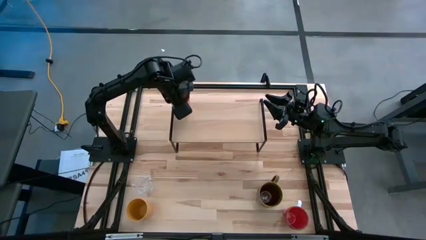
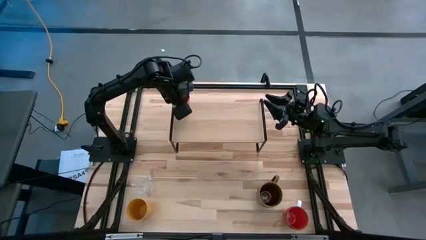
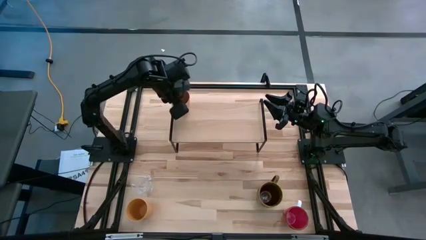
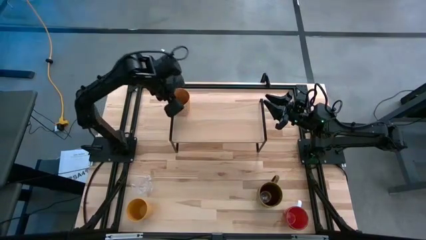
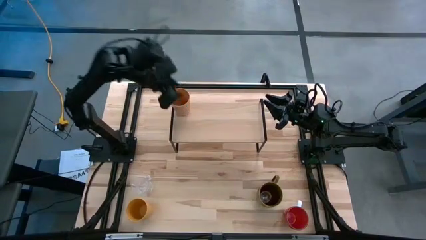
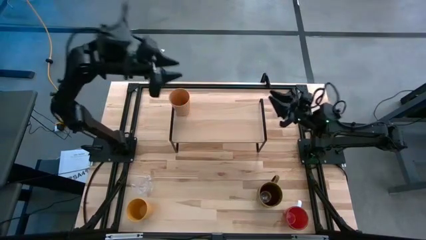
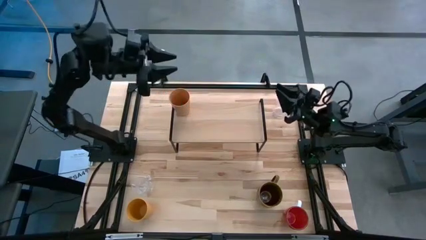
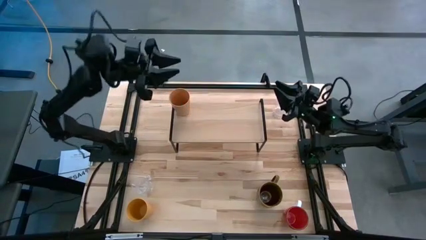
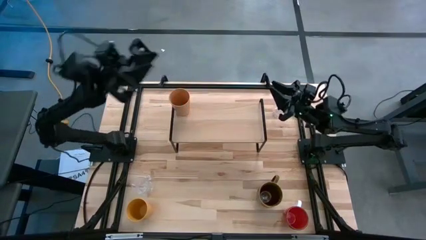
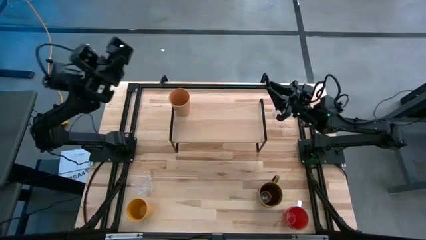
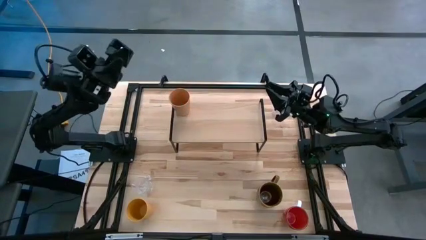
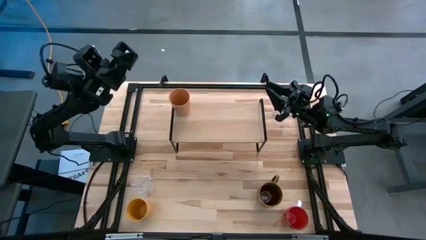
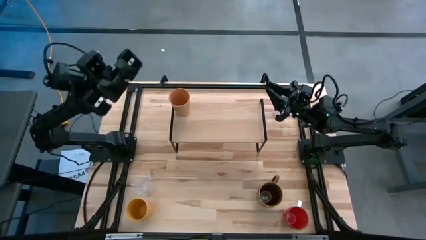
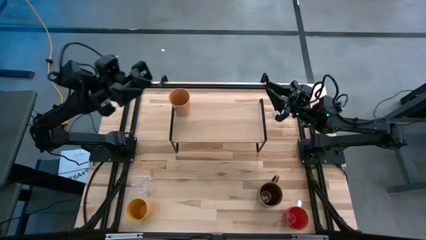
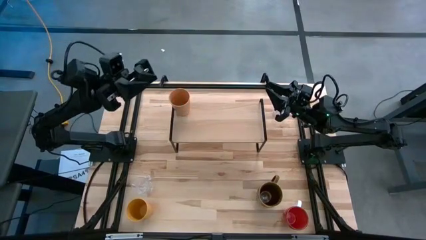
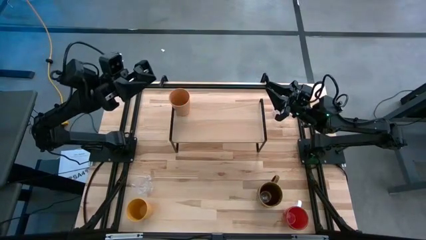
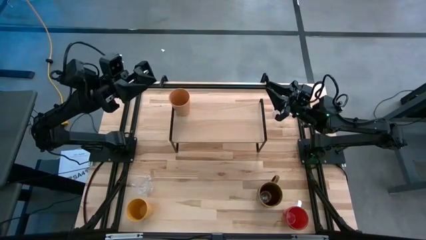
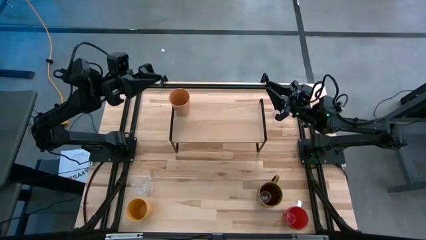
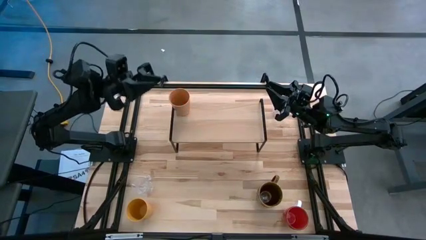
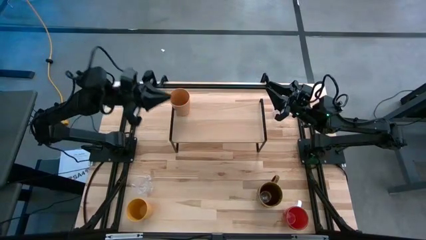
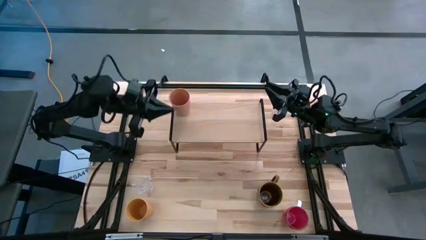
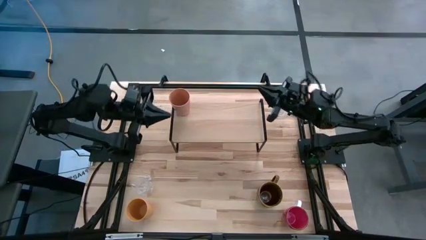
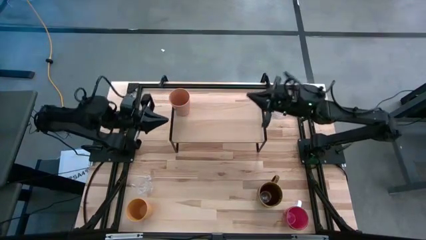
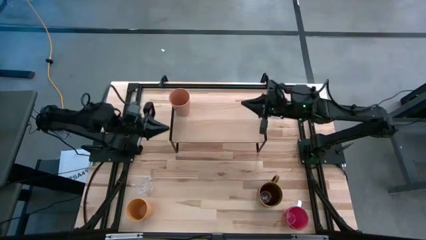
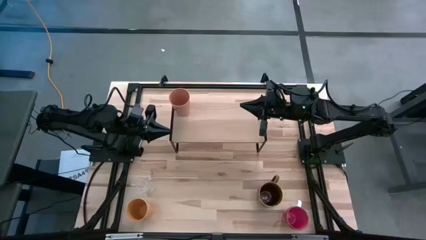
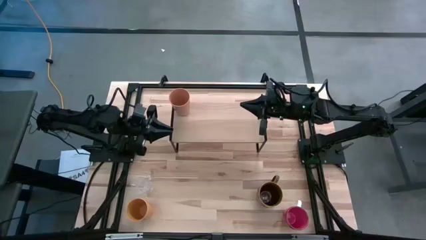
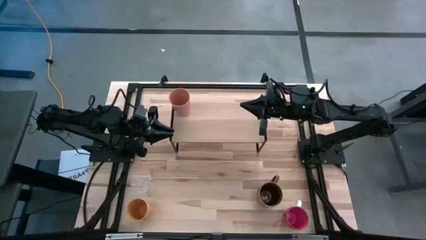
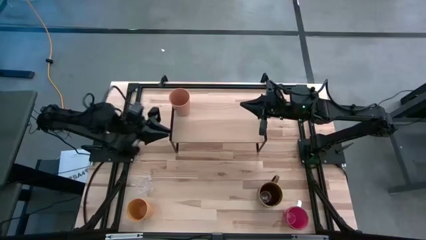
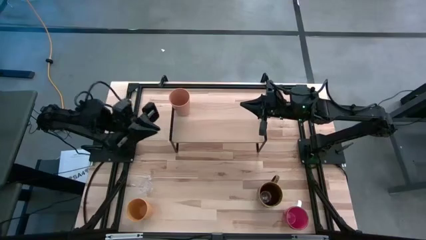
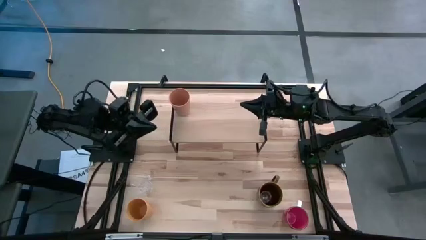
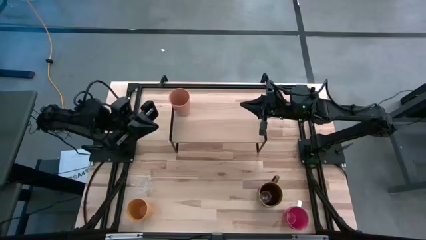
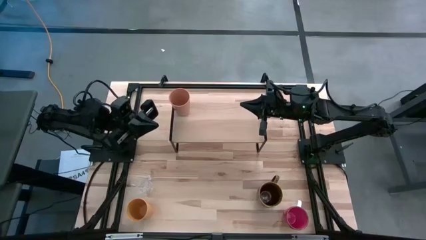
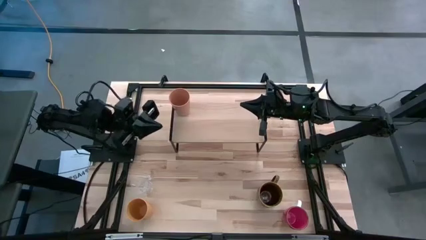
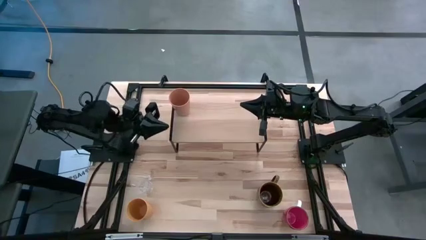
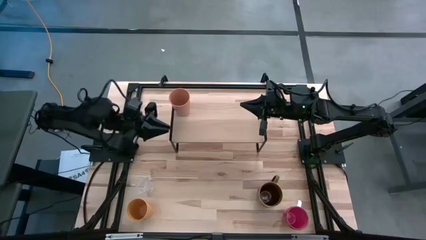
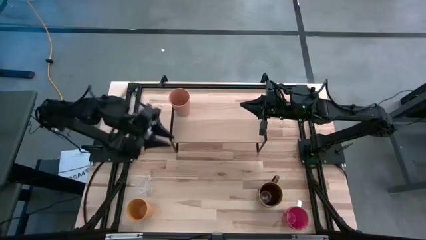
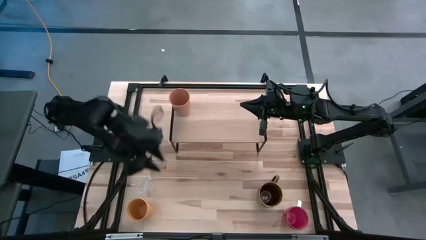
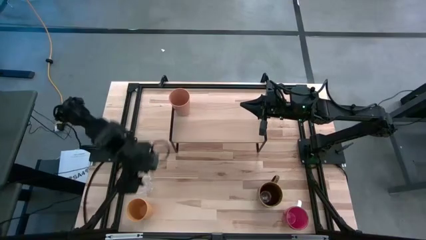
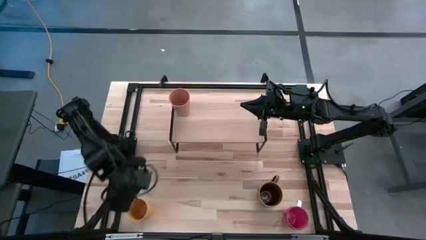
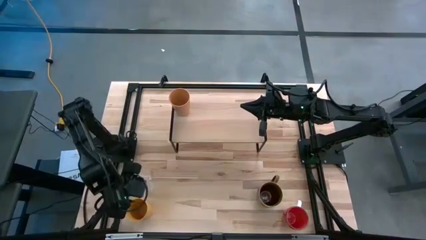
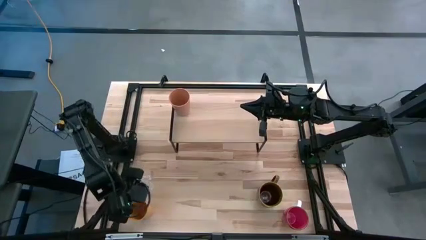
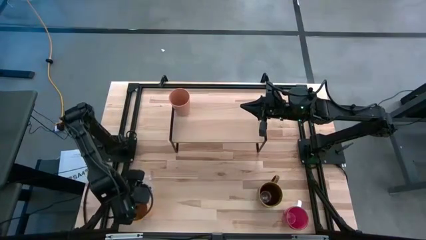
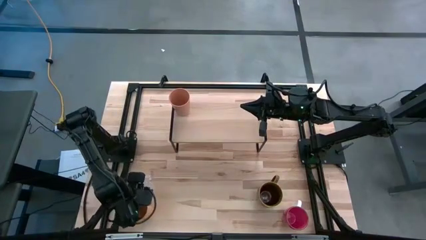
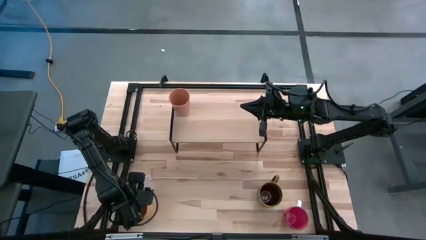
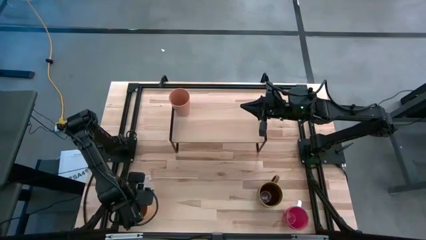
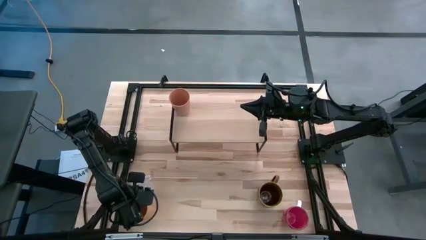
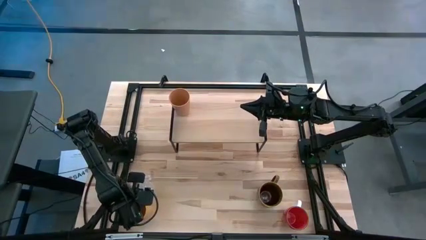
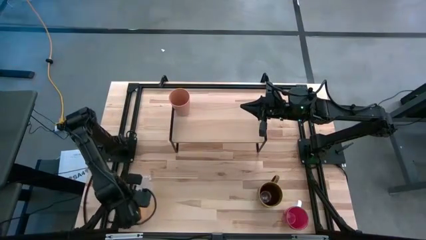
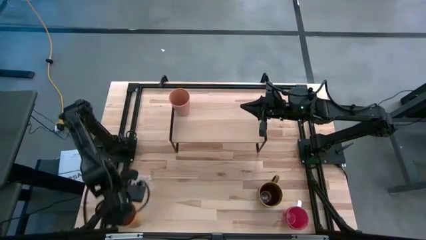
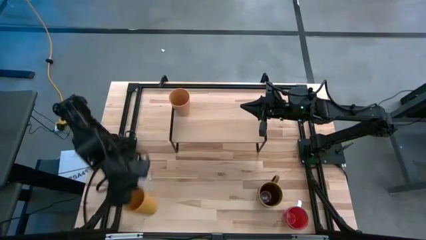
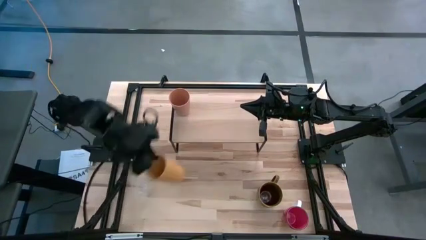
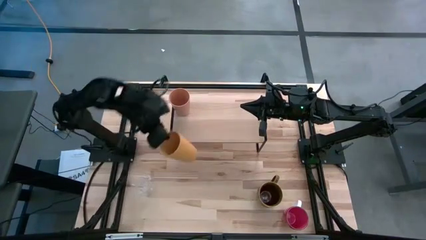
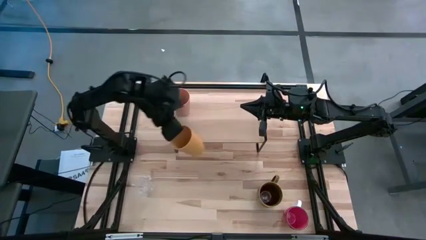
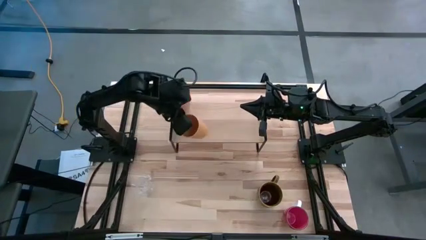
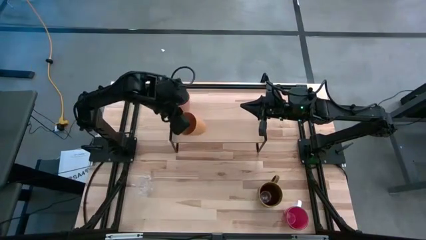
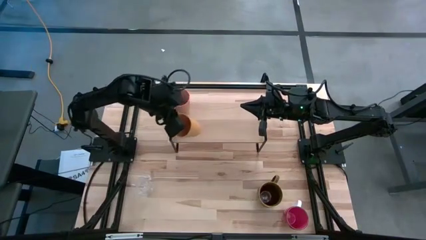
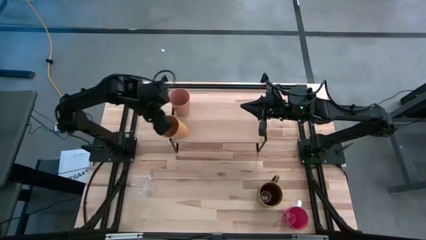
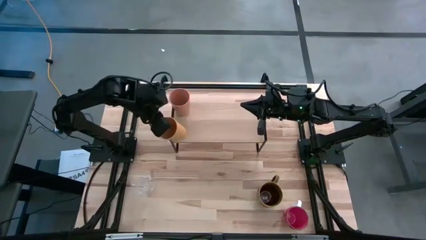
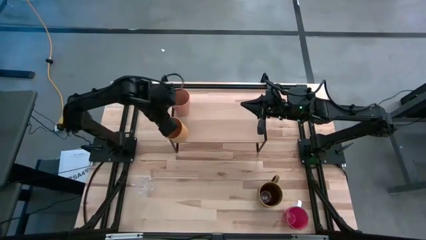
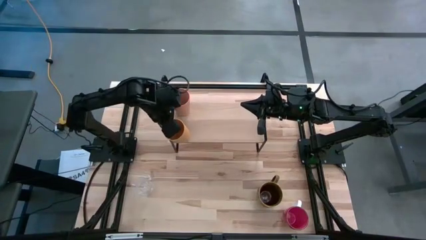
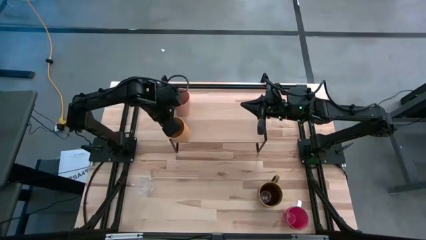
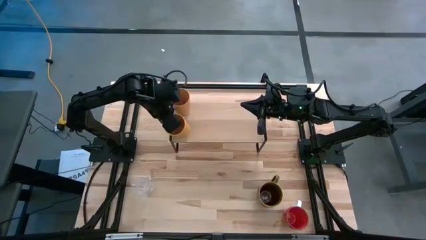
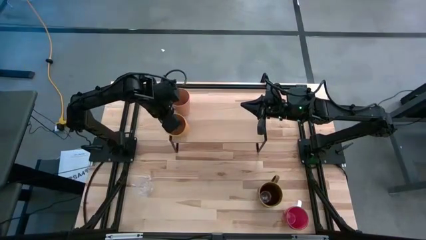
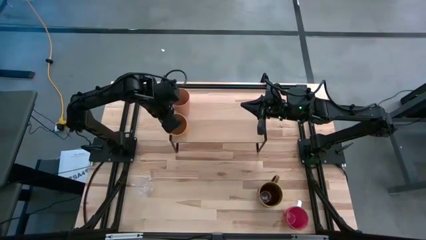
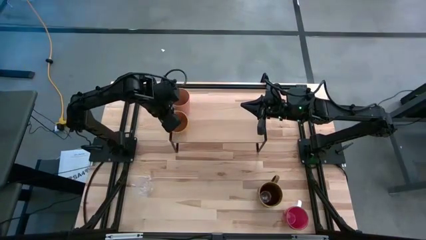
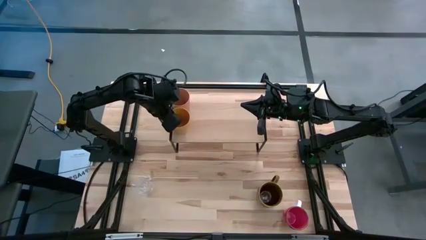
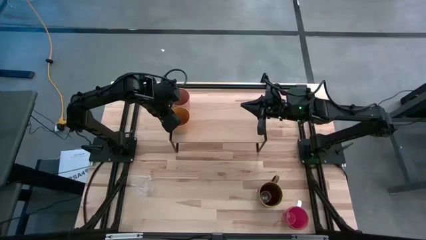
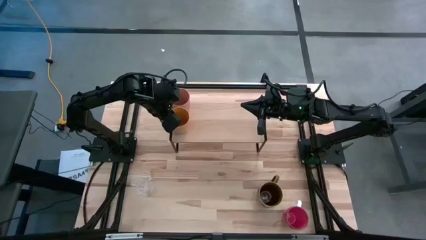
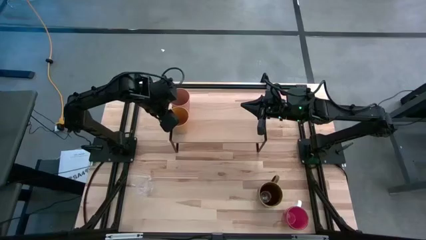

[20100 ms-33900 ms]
Task: Stack small to large cups/mugs on shelf
Put the yellow cup on the shelf

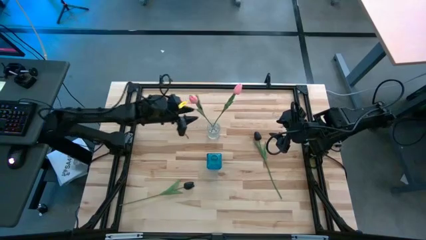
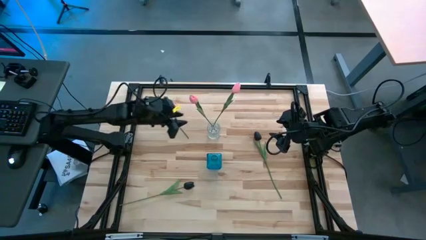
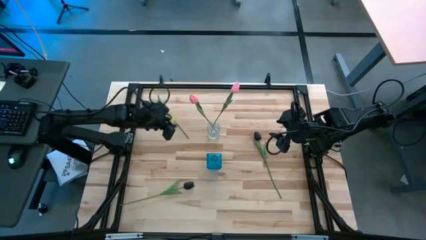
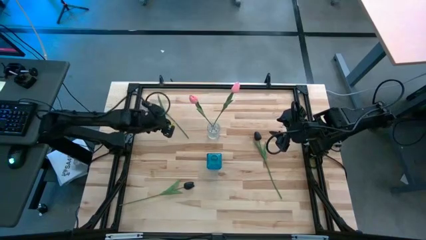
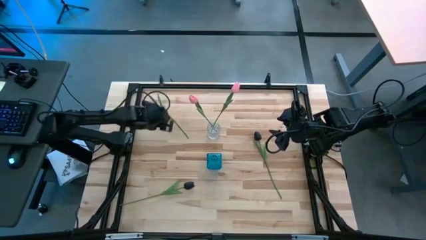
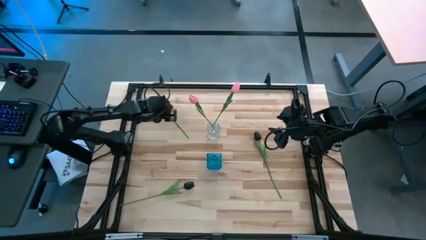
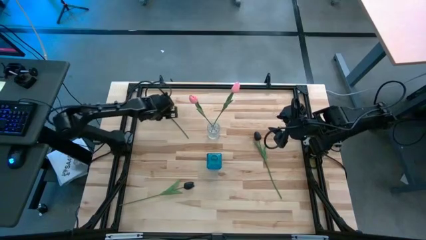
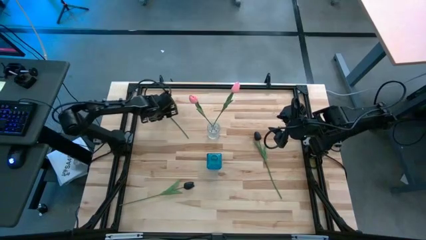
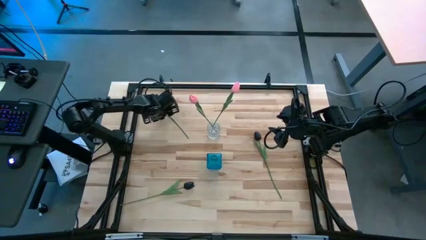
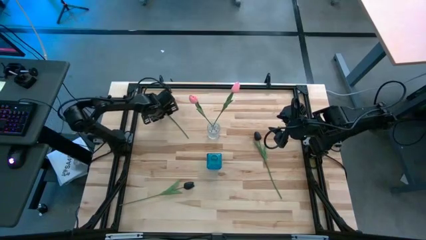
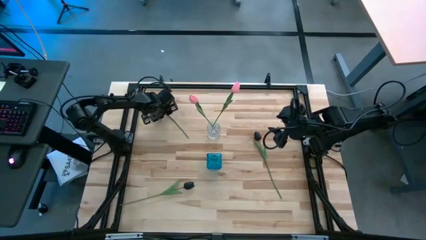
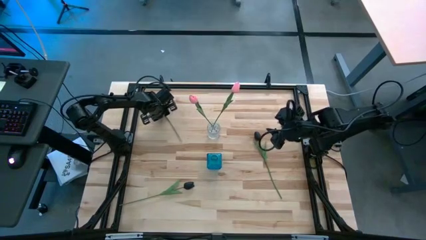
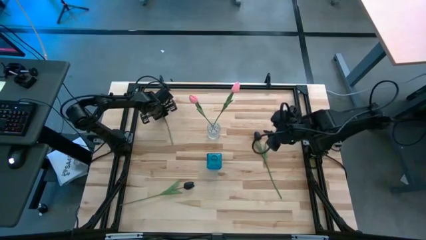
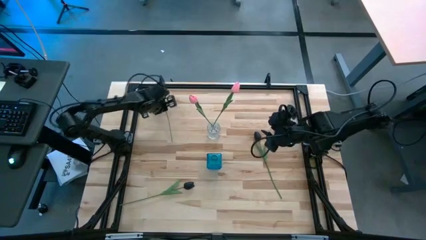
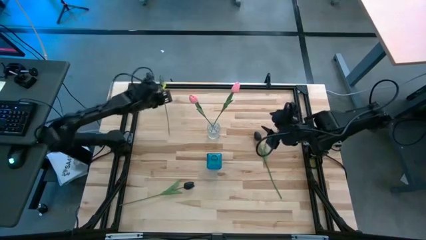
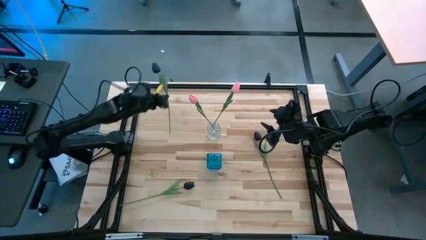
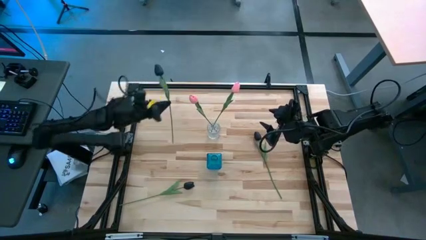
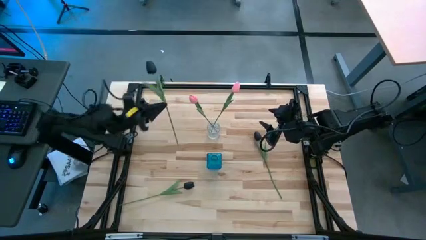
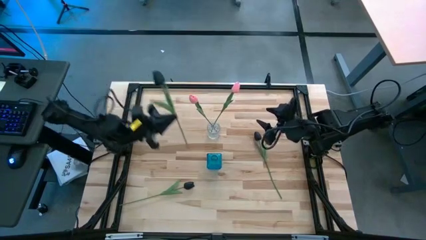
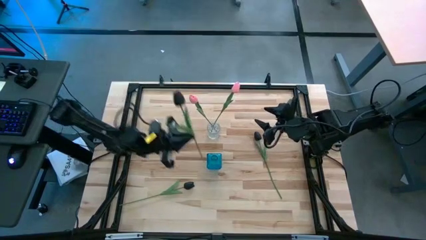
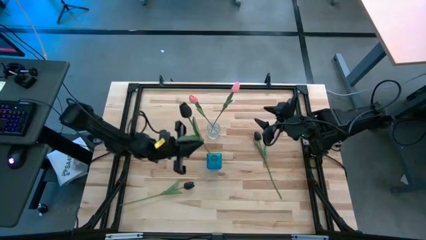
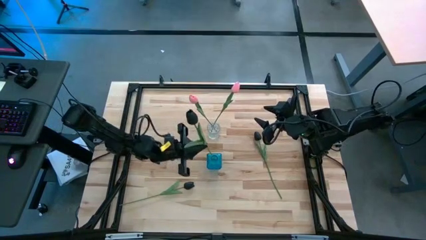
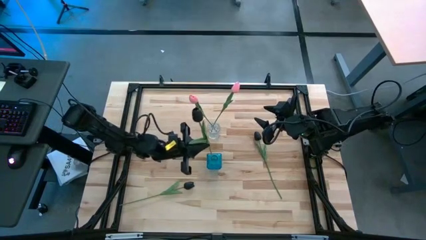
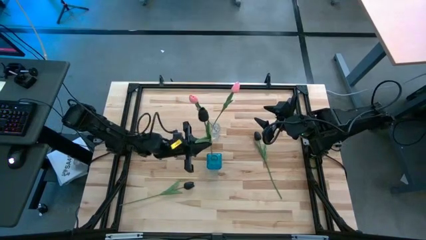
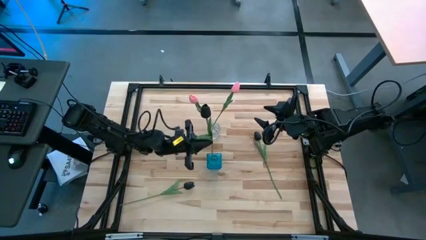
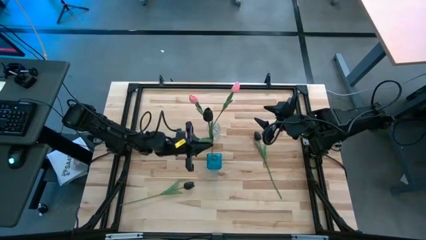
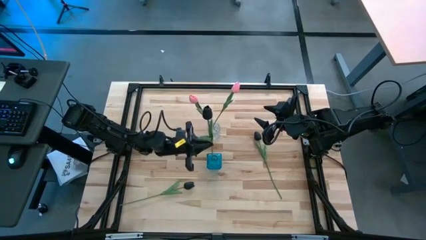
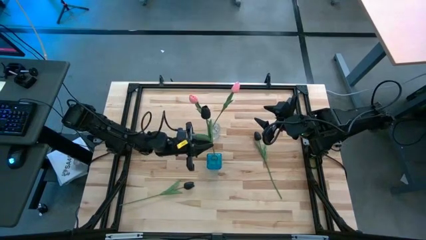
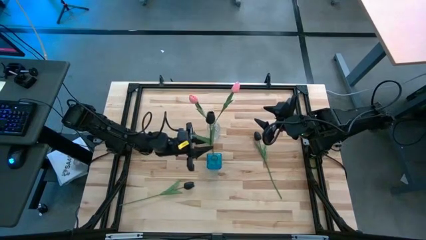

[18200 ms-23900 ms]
Task: Sort flowers into vase by color
Put the top left black tulip into the blue vase
